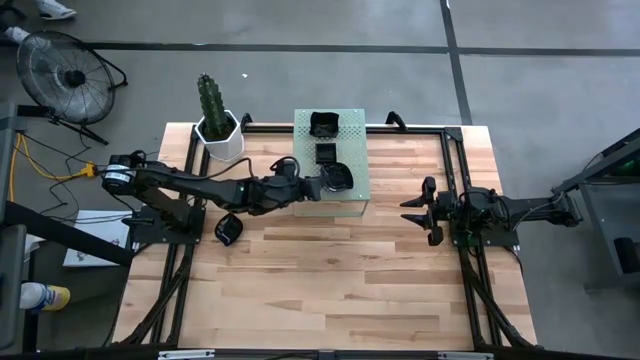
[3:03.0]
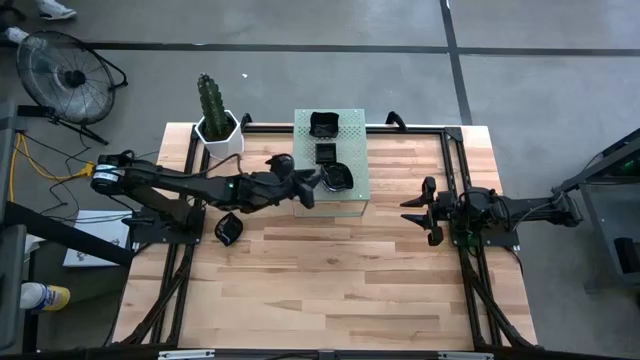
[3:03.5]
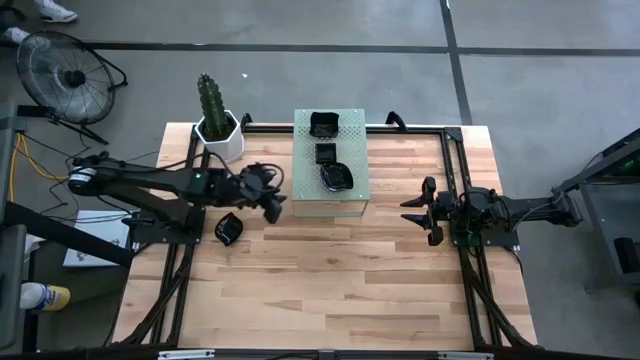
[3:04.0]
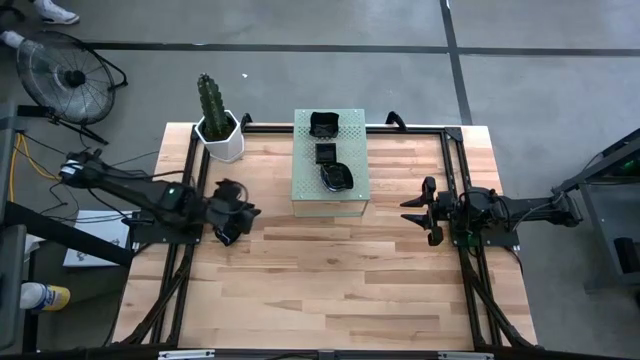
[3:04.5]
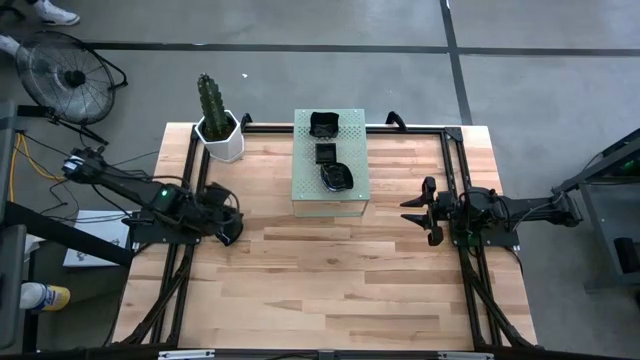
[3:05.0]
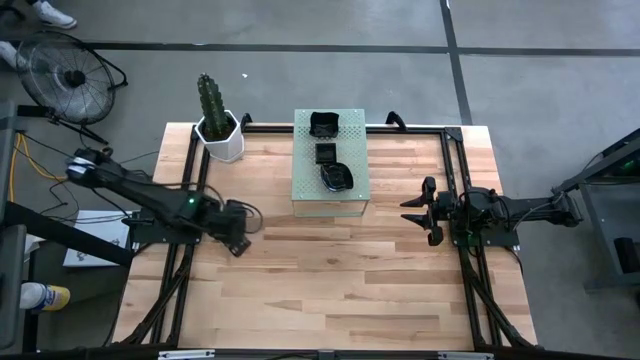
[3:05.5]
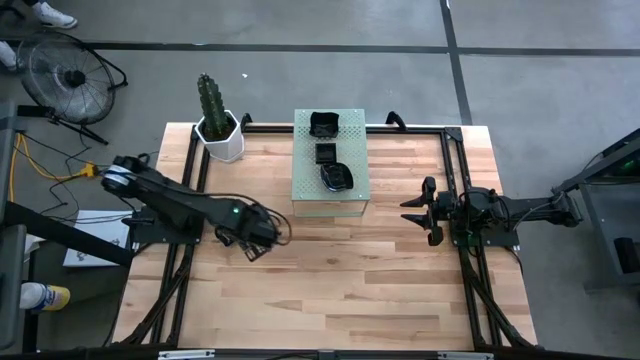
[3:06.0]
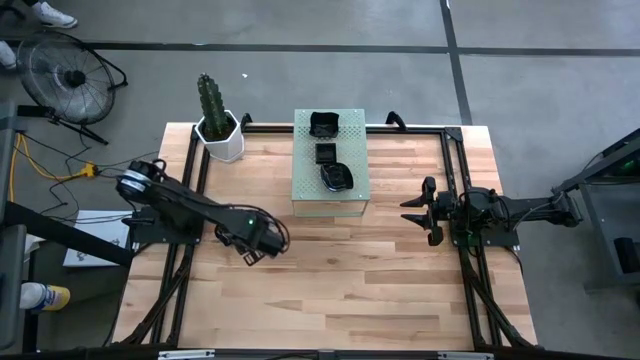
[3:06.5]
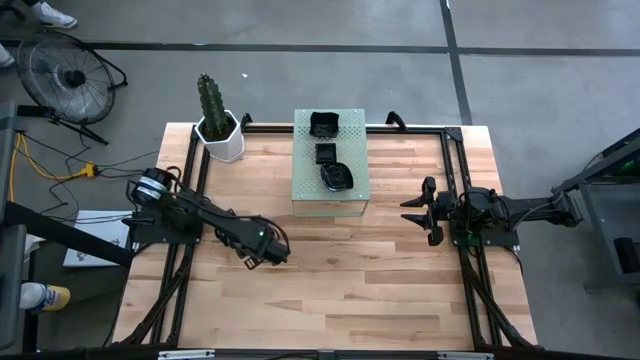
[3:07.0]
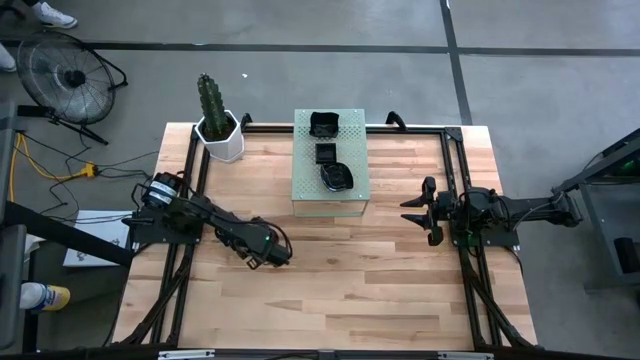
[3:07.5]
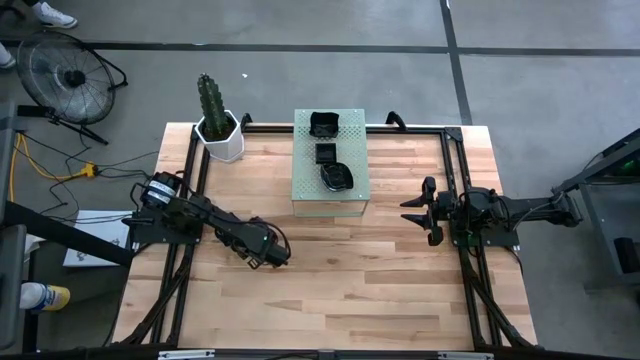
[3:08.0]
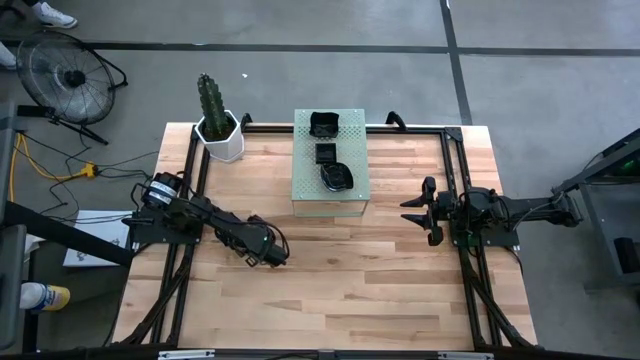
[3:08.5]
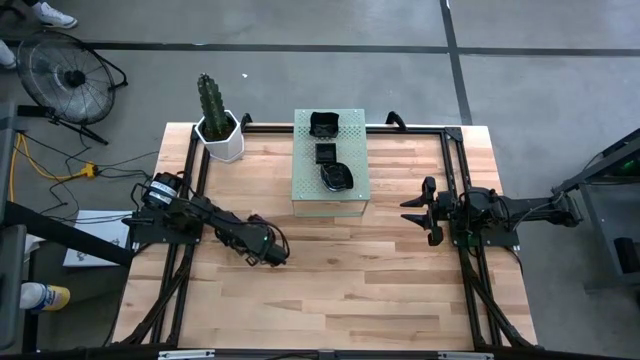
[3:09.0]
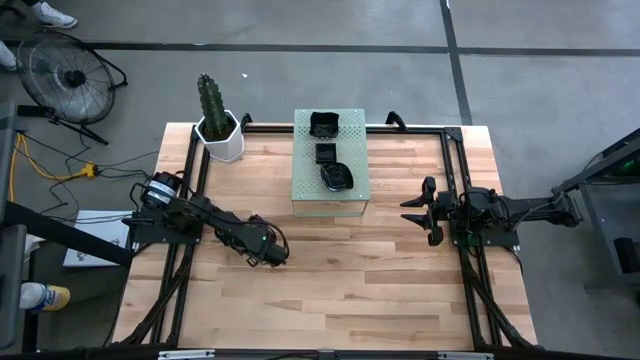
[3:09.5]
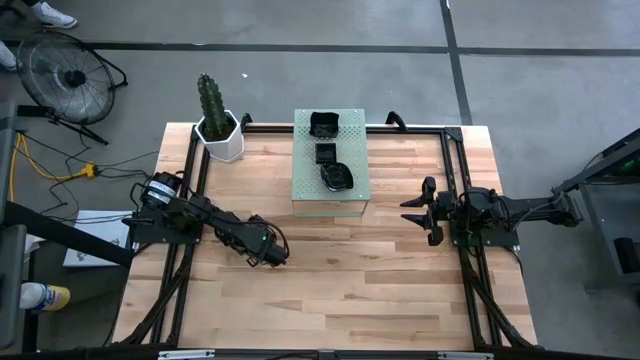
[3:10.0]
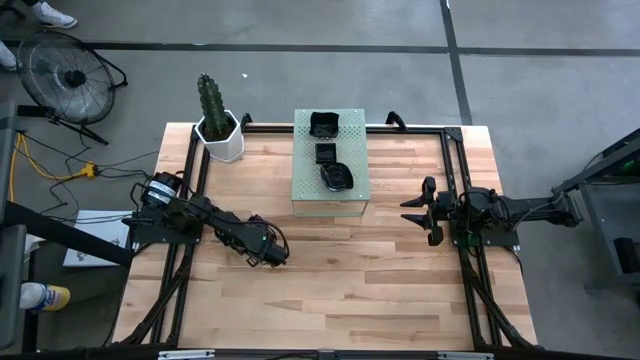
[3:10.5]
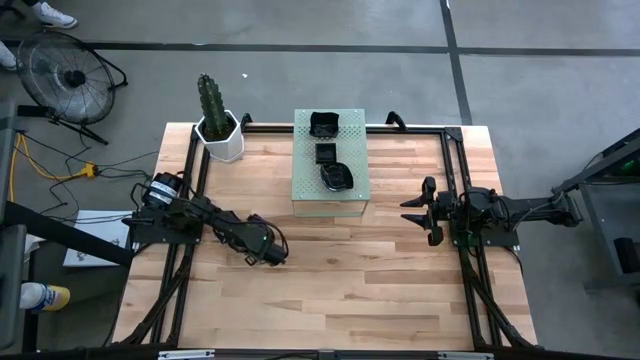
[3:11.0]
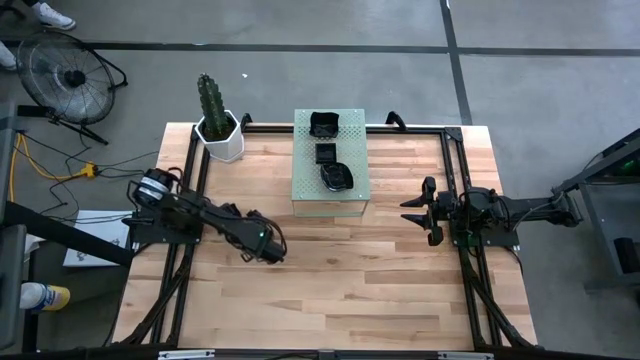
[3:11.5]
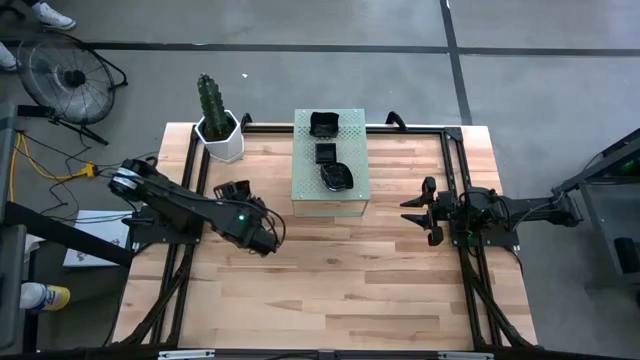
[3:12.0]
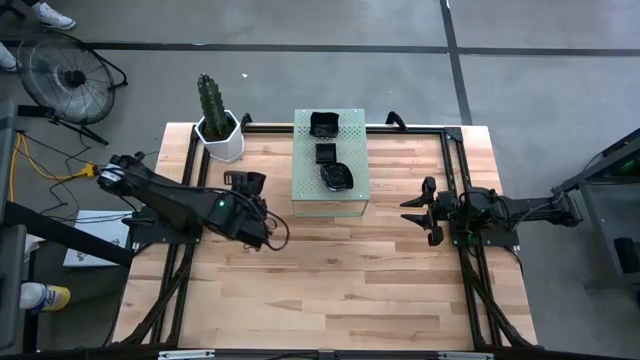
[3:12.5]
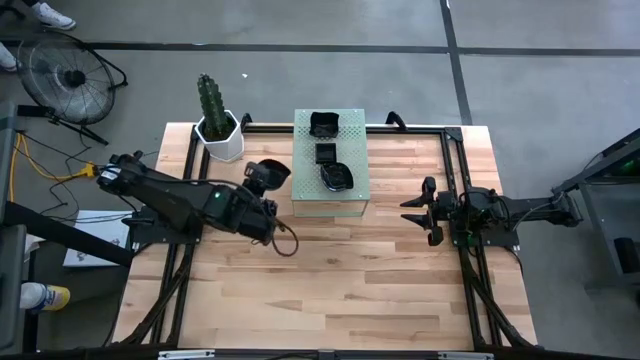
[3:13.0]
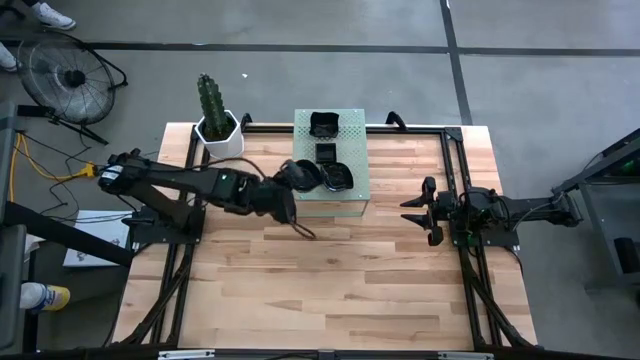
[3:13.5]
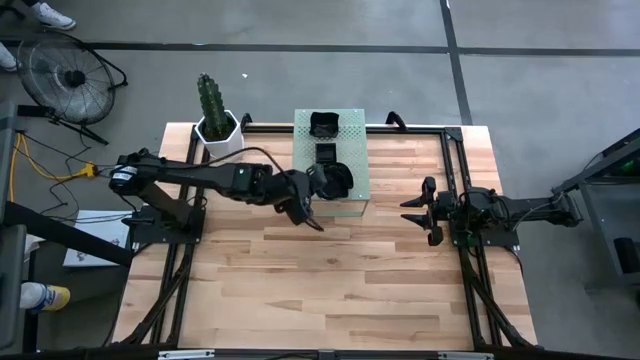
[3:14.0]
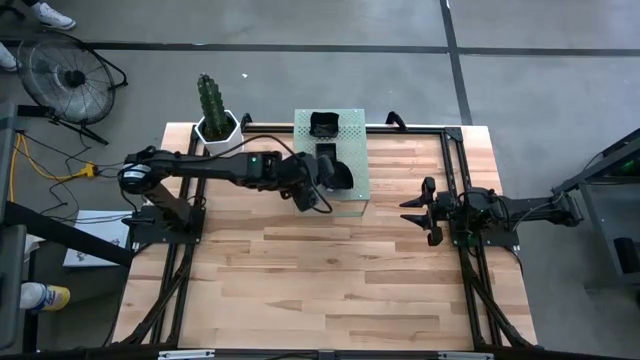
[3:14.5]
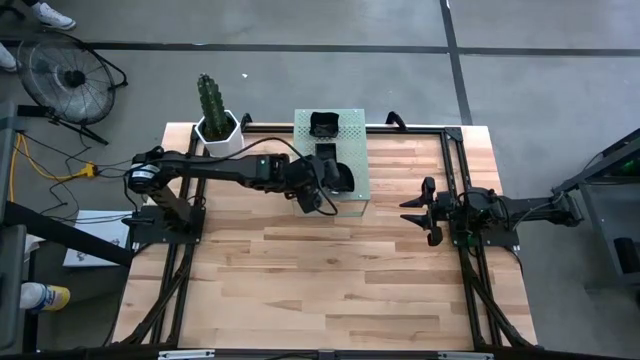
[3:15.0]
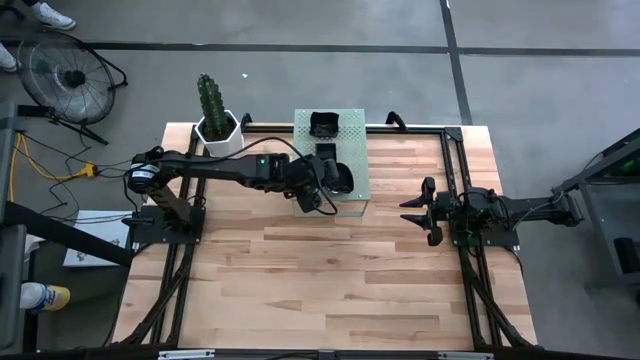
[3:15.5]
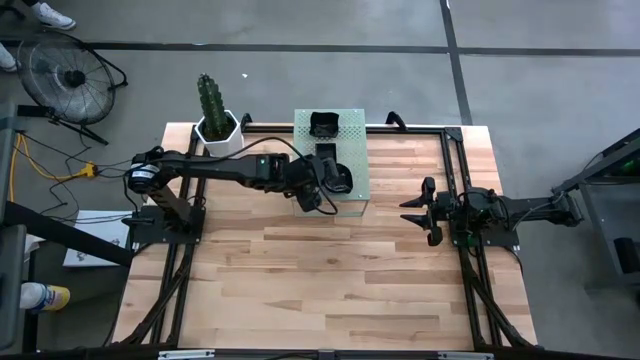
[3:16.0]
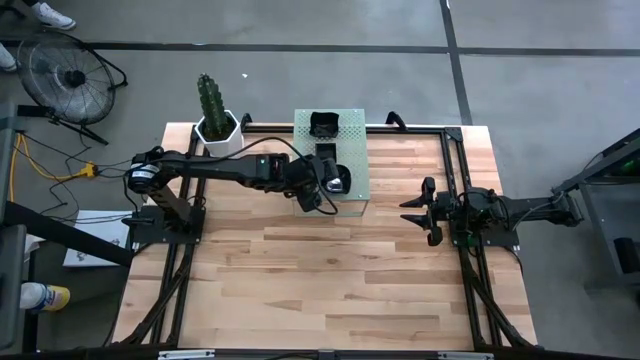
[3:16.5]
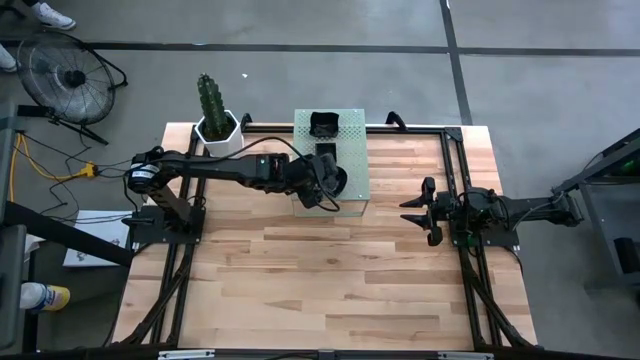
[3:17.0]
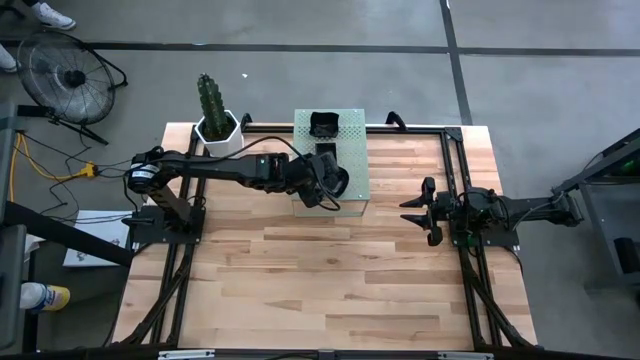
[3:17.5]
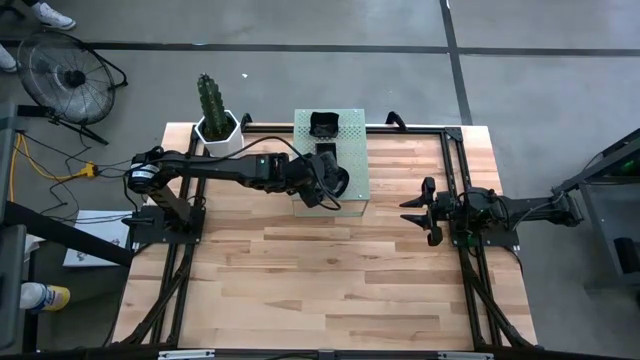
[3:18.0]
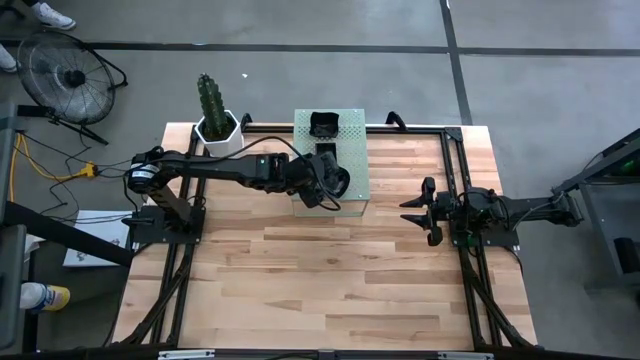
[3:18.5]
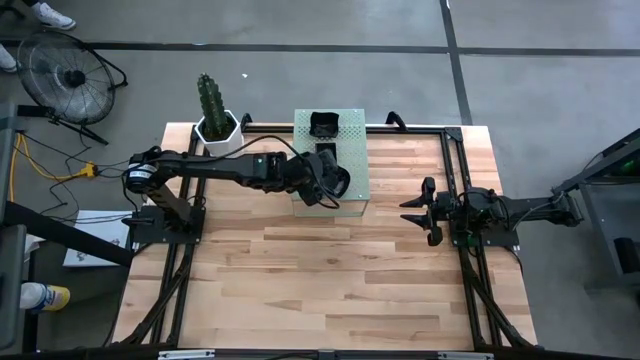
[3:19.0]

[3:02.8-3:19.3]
Task: Pick & Place Mini shaped plates
Stack the black leaf shaped plate on top of the black leaf shaped plate on the shelf

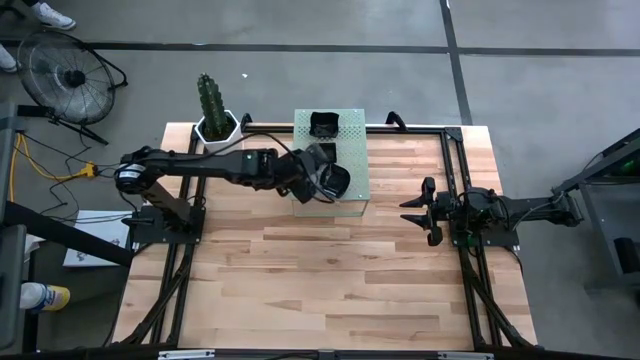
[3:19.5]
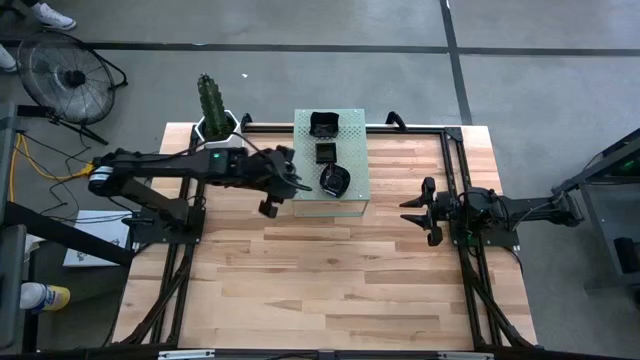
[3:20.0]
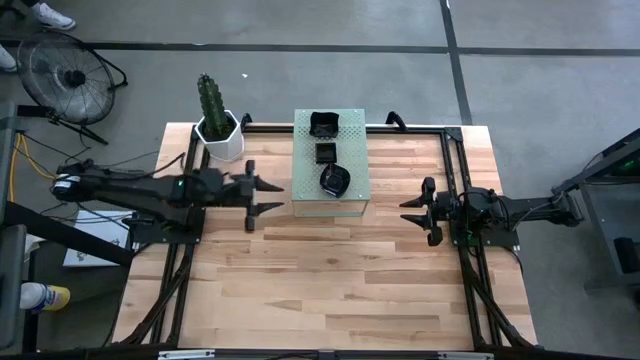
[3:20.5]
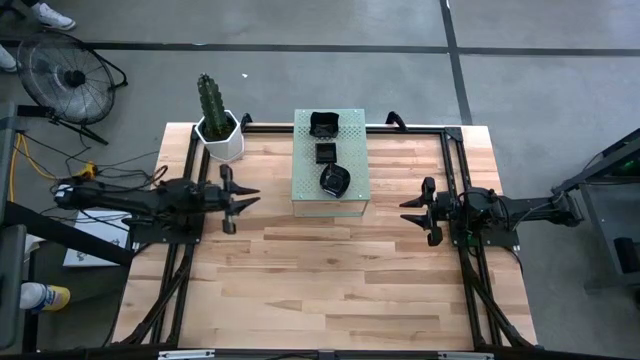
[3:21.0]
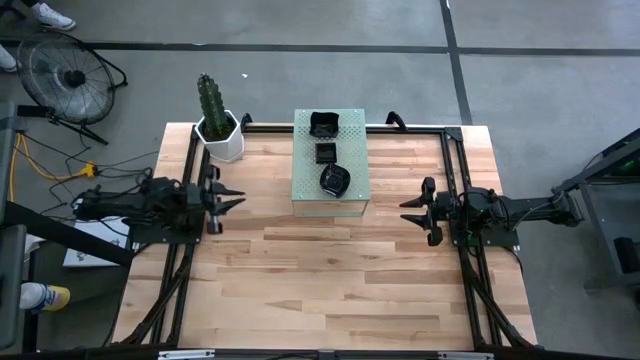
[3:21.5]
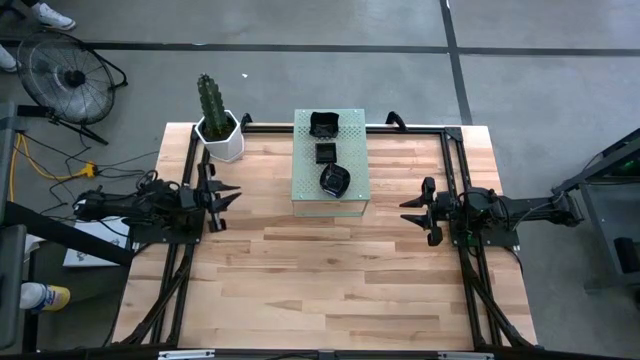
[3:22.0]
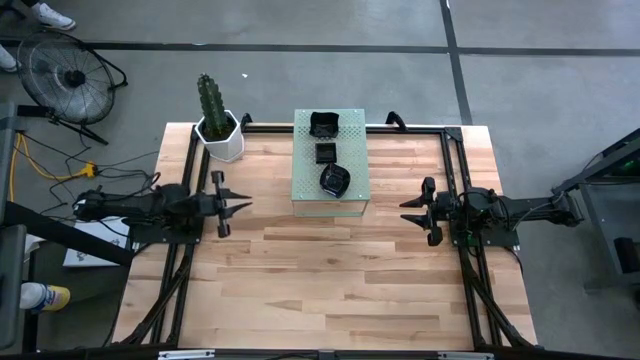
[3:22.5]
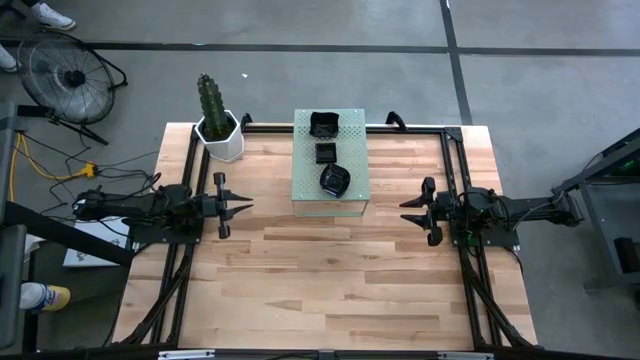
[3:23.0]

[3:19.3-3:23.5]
Return to Home Position
